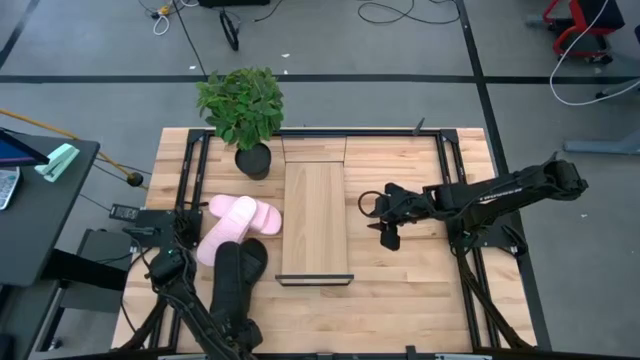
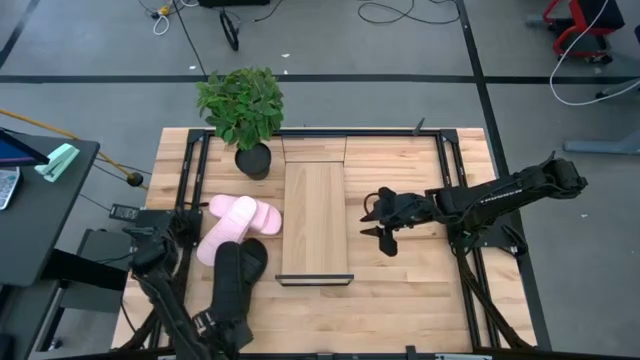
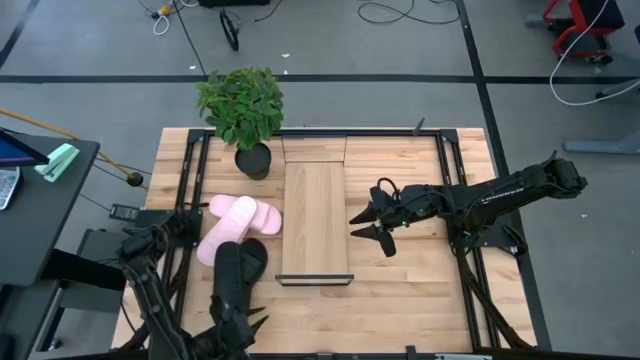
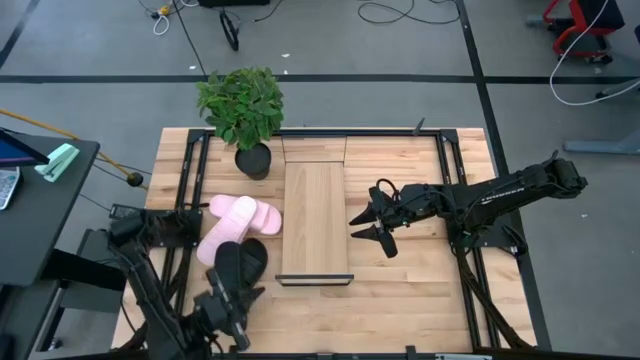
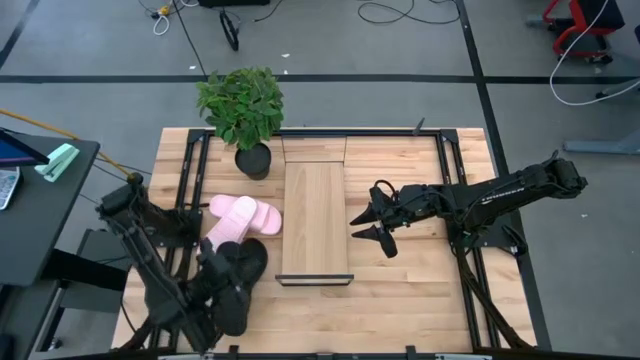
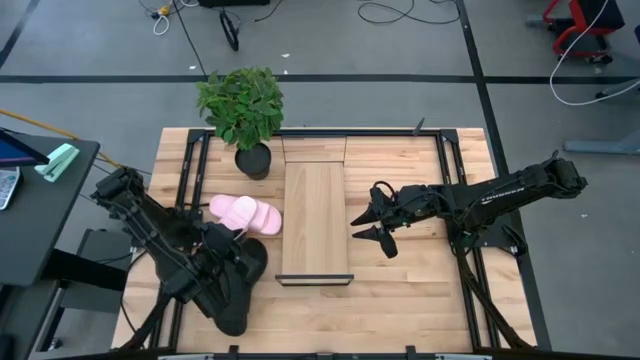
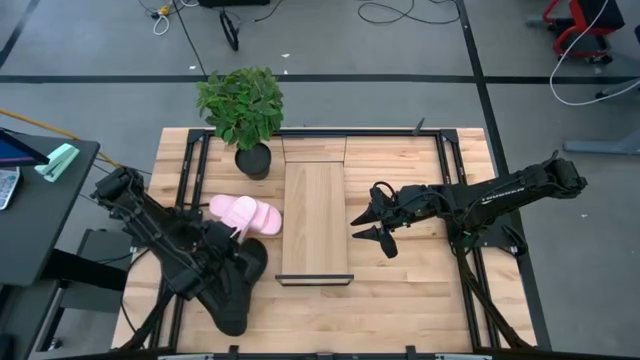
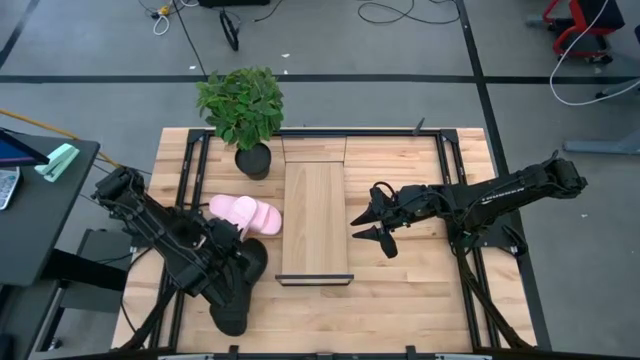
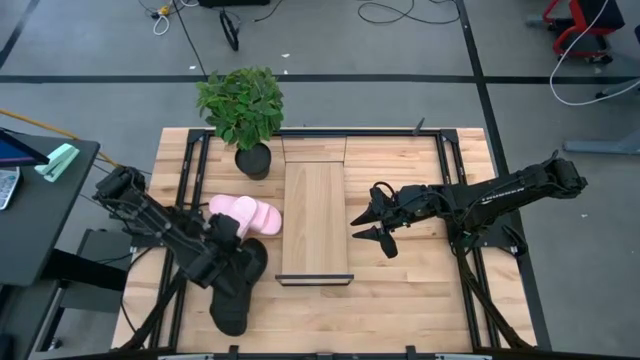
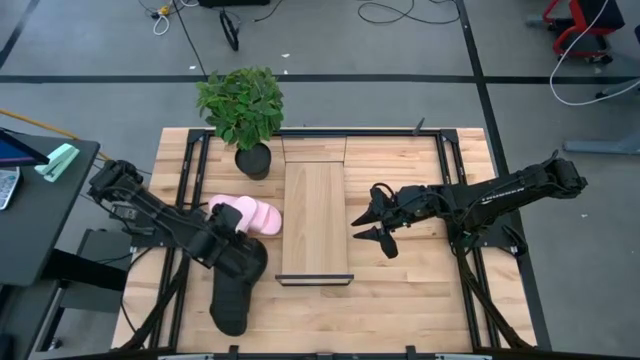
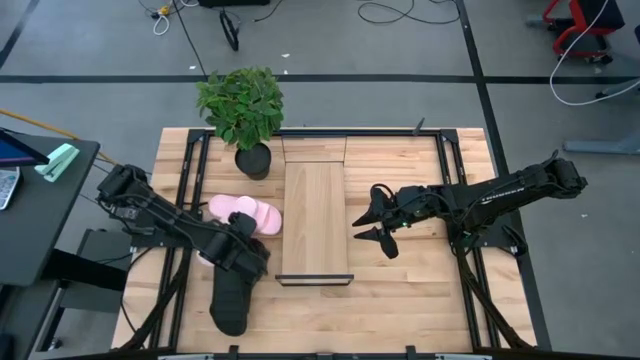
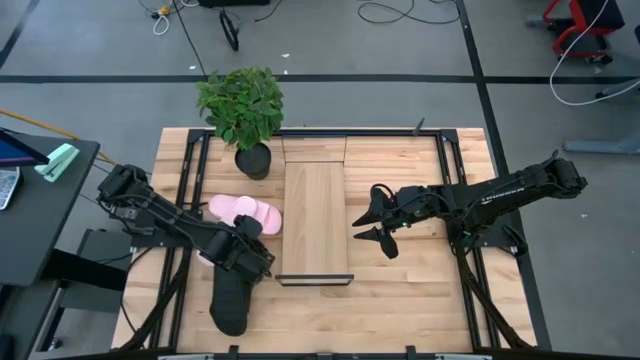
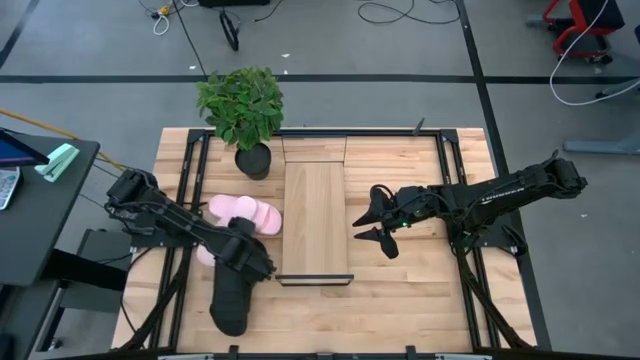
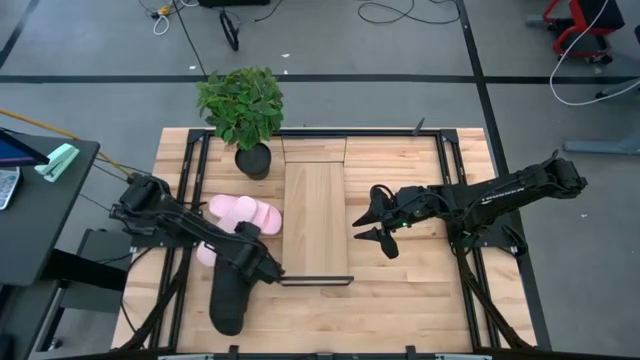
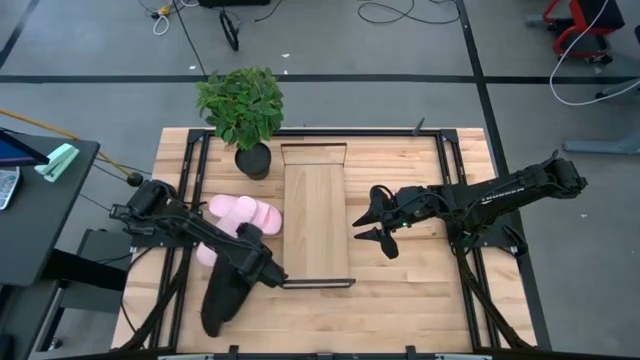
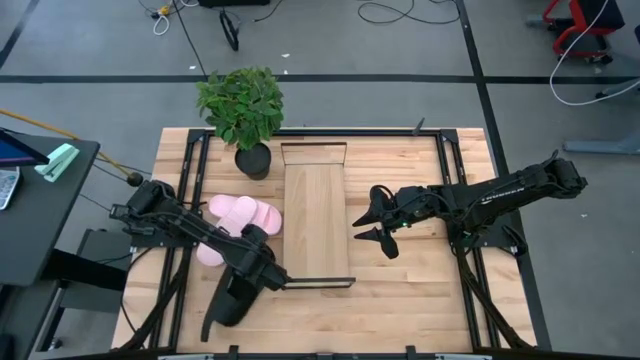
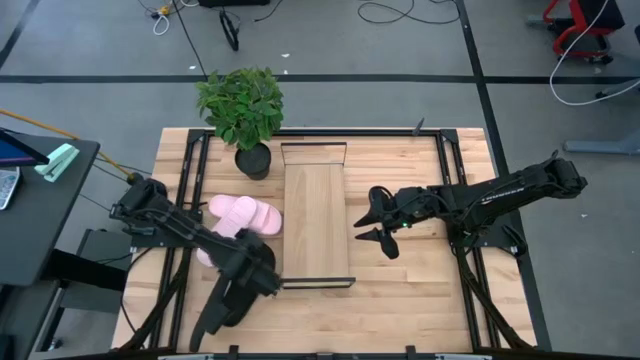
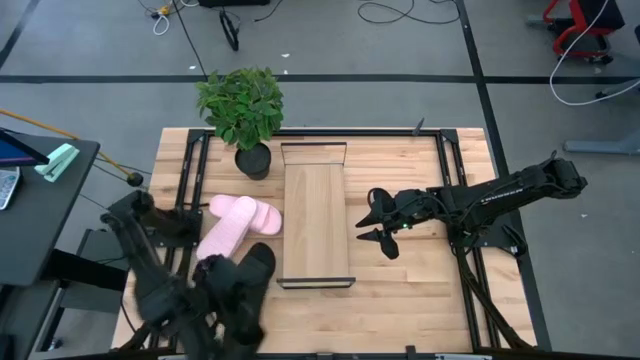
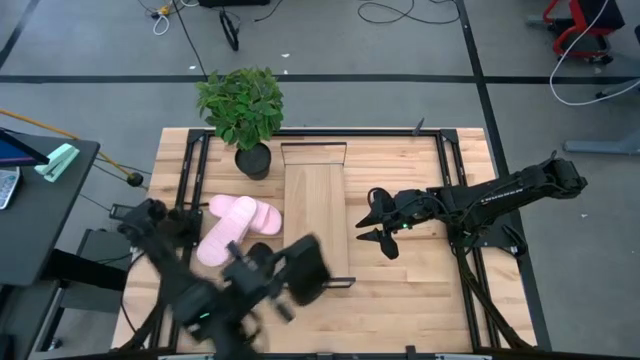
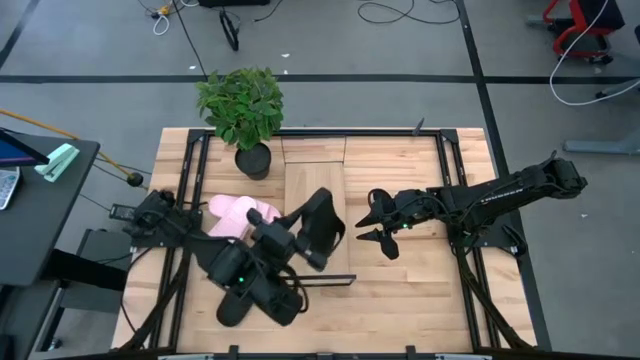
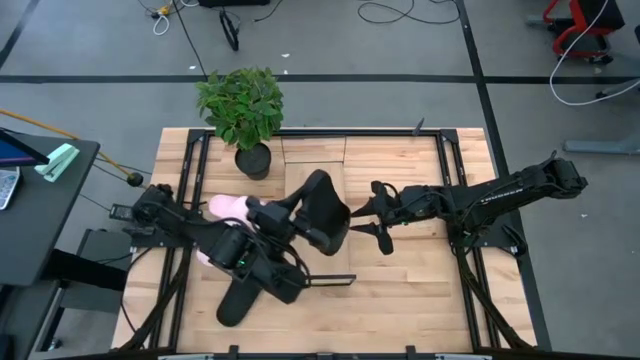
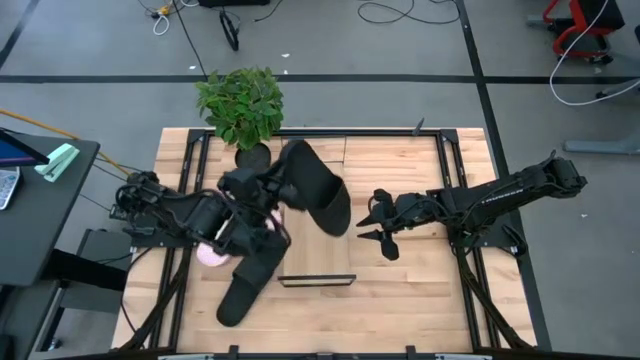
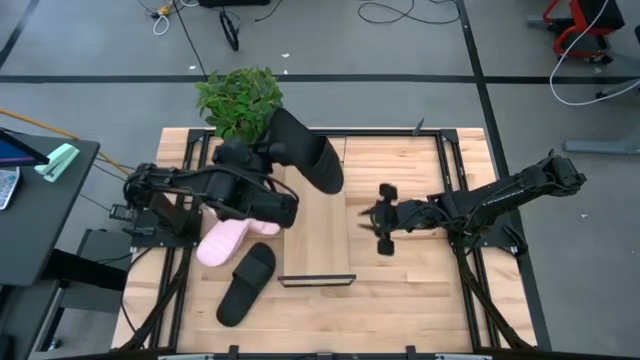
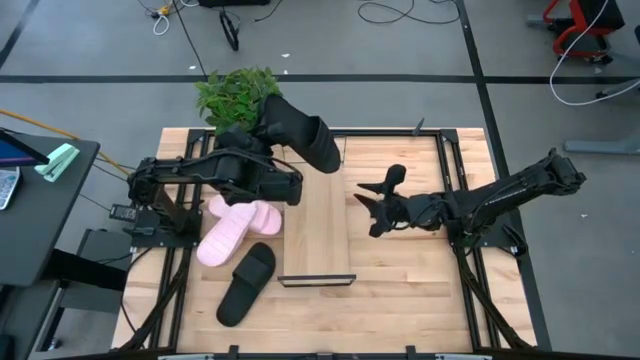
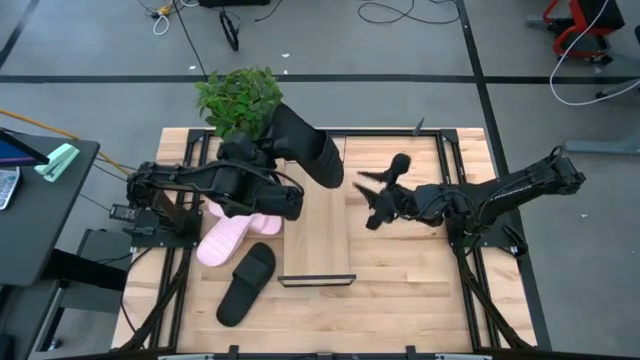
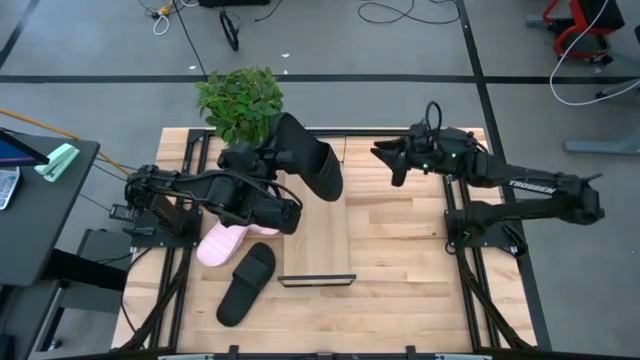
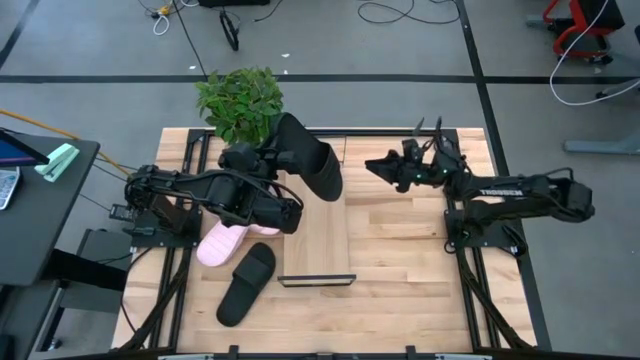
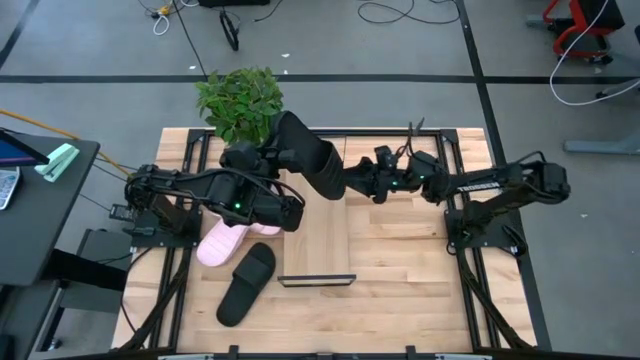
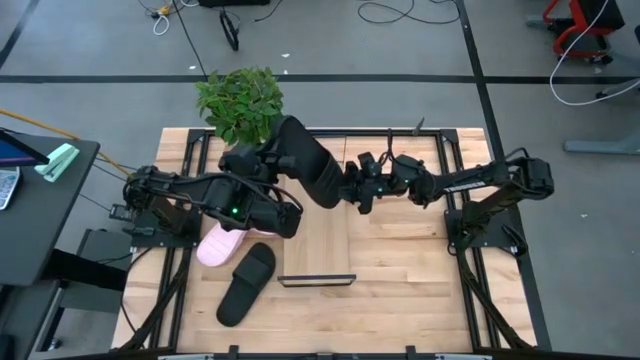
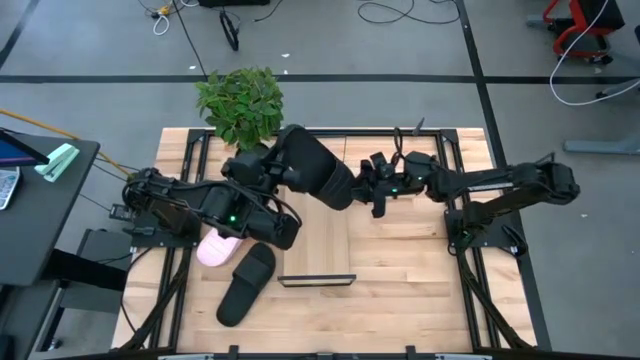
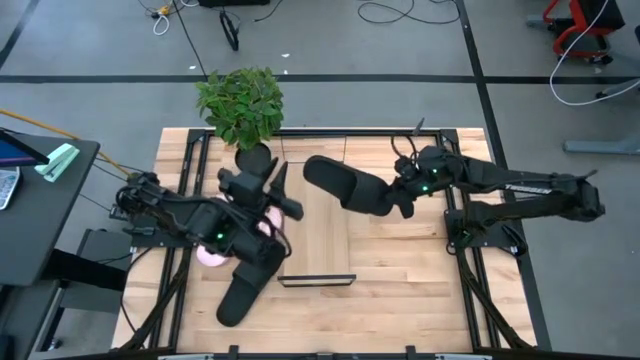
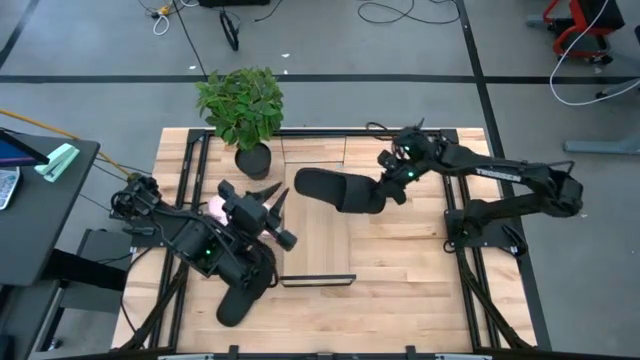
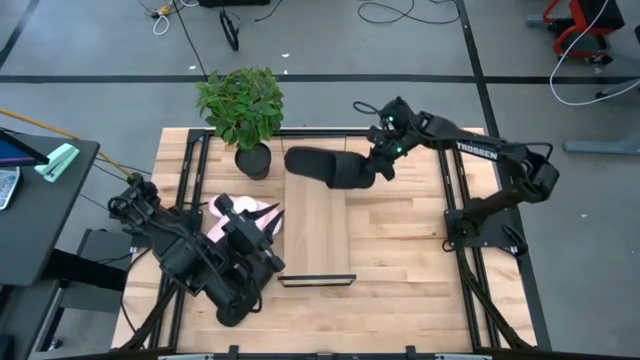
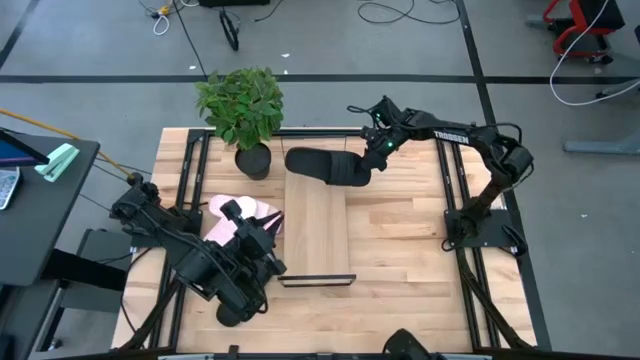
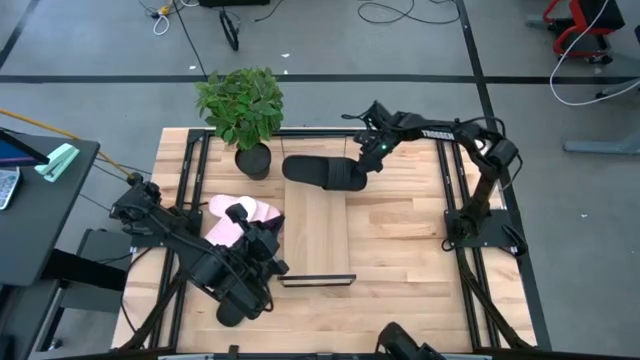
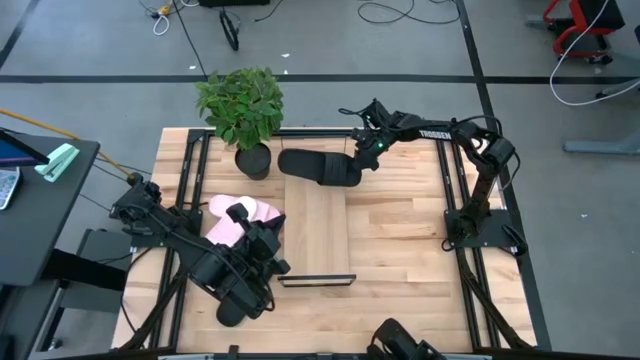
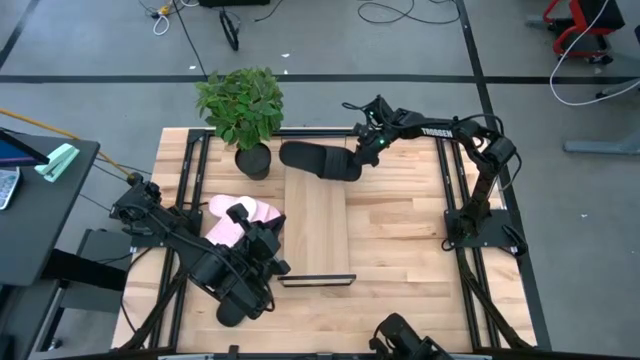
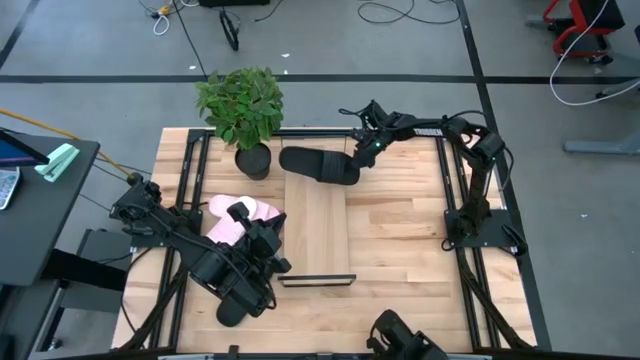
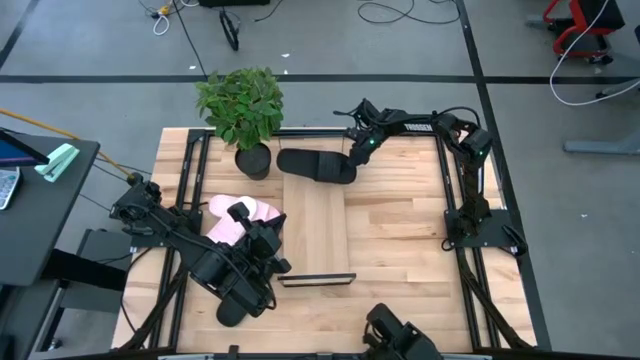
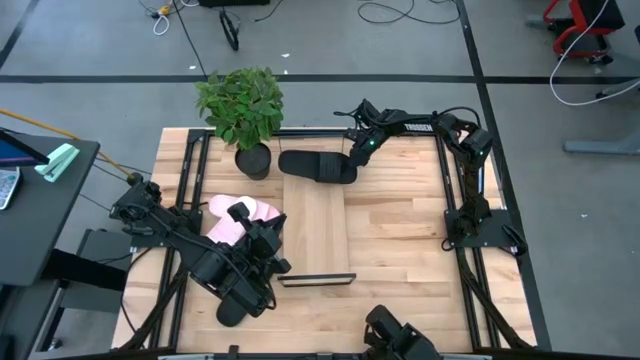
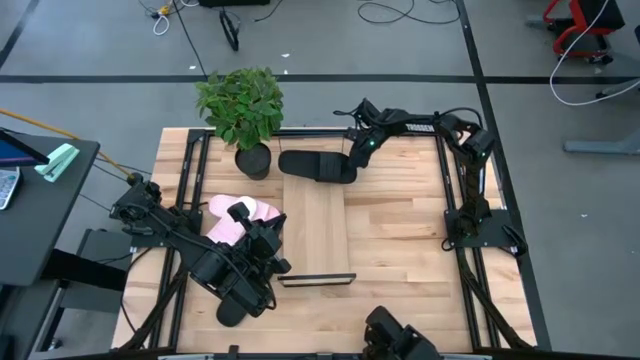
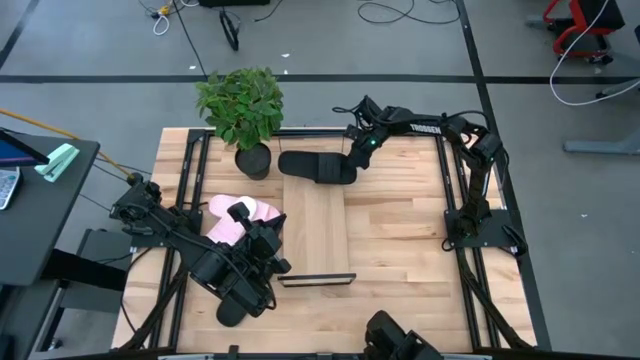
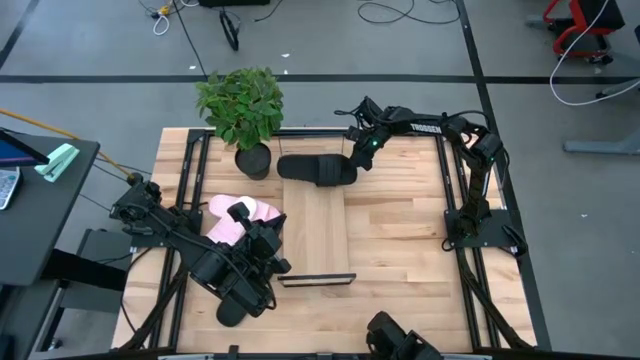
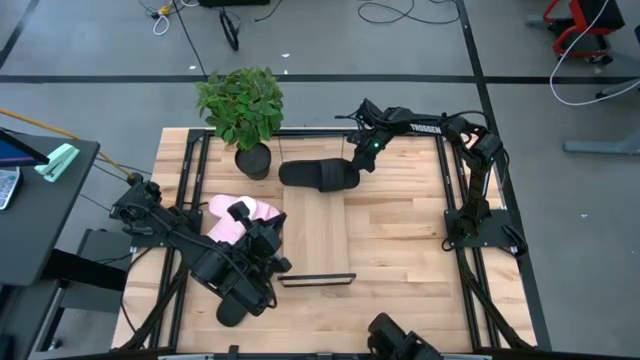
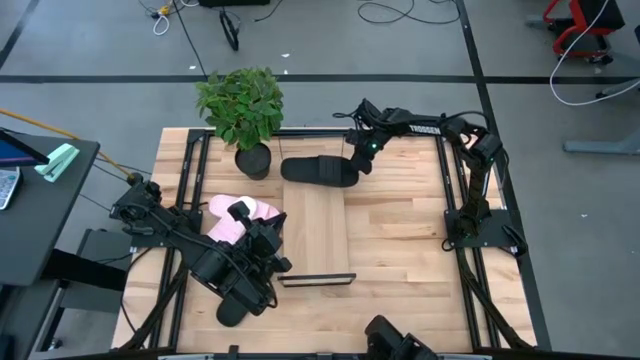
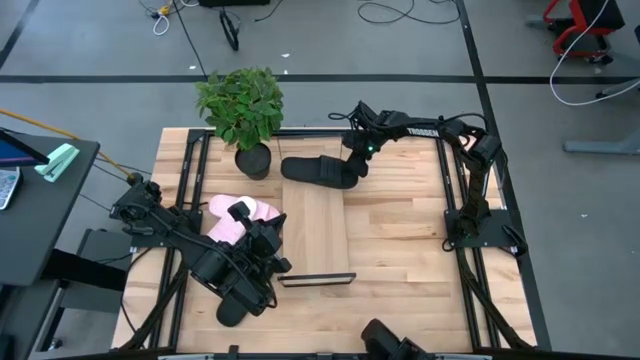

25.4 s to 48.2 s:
Task: Pick and place slides into the shelf
Put the bottom black slipper on the shelf
